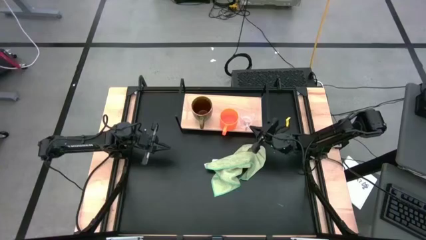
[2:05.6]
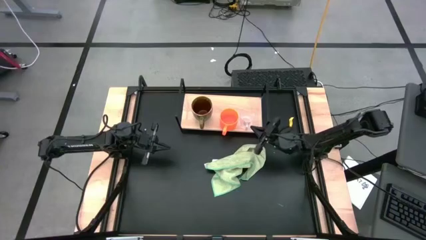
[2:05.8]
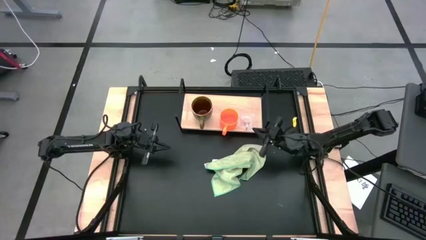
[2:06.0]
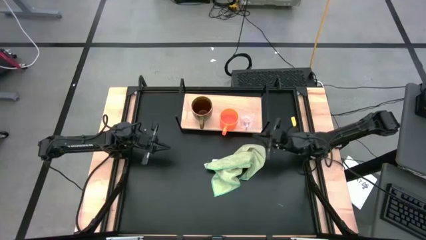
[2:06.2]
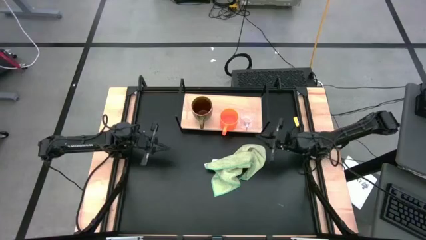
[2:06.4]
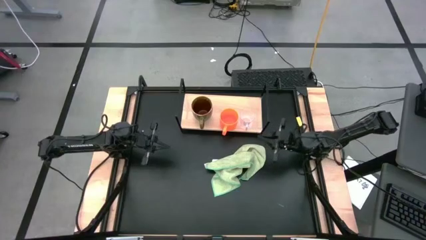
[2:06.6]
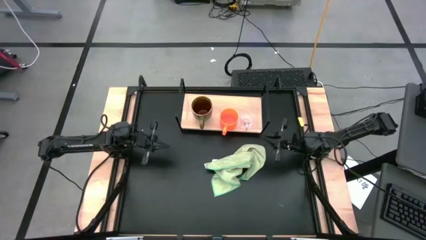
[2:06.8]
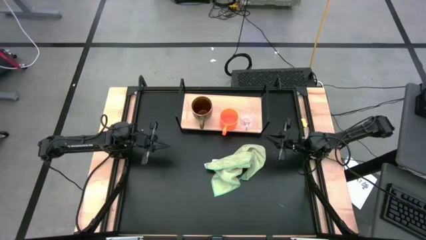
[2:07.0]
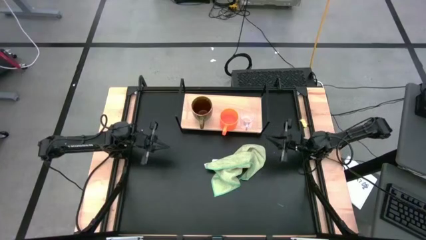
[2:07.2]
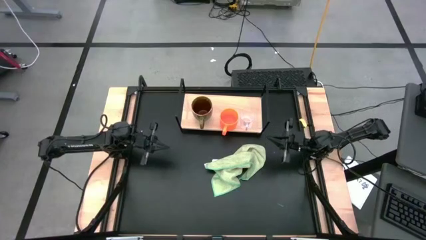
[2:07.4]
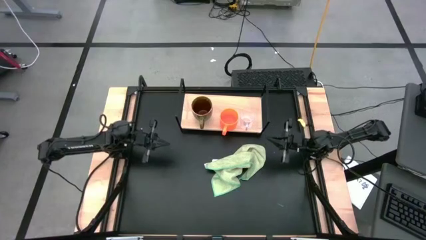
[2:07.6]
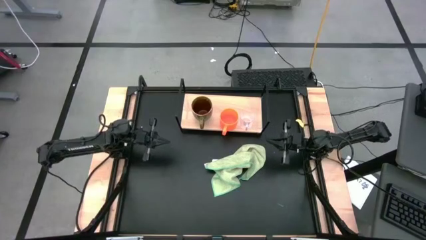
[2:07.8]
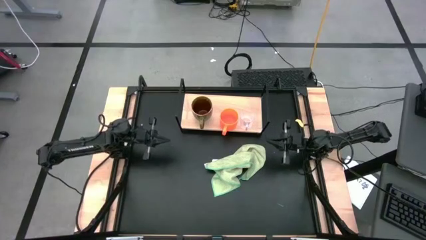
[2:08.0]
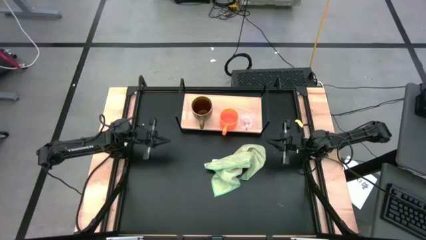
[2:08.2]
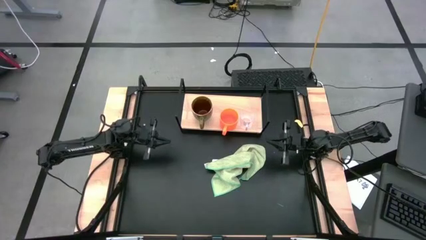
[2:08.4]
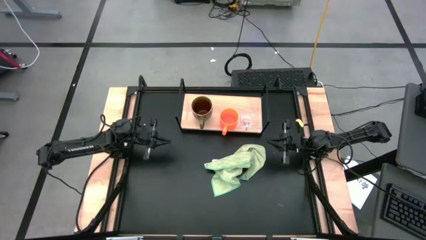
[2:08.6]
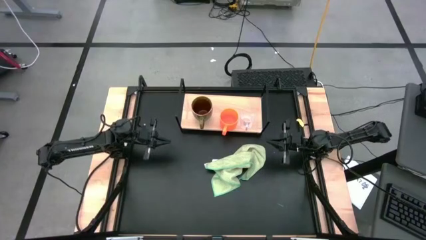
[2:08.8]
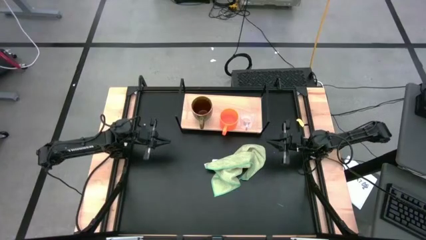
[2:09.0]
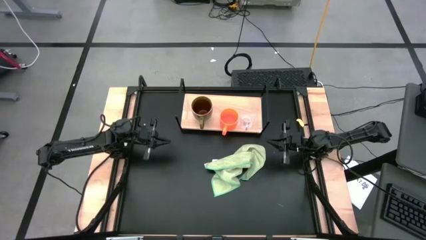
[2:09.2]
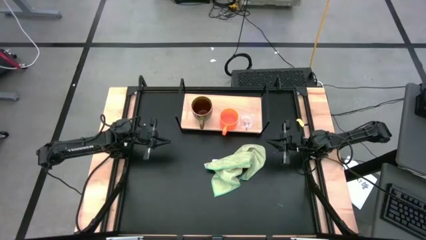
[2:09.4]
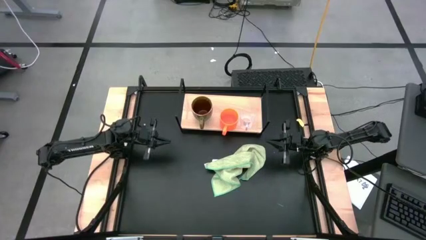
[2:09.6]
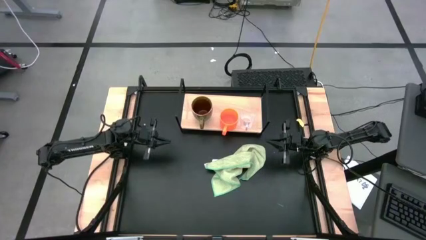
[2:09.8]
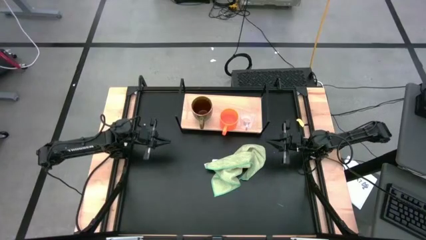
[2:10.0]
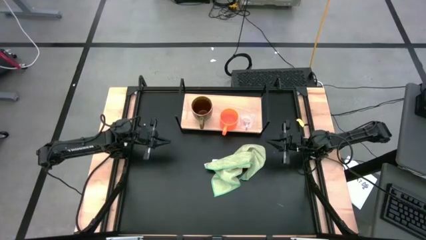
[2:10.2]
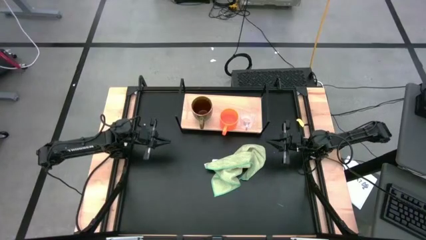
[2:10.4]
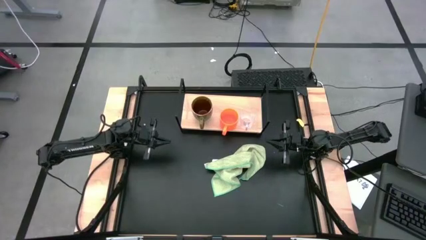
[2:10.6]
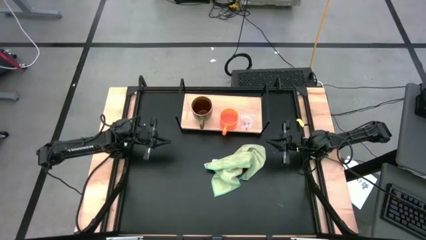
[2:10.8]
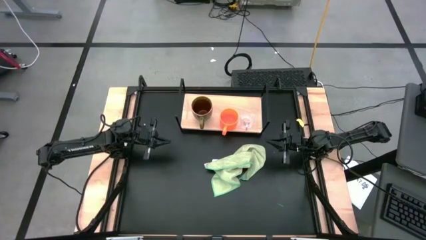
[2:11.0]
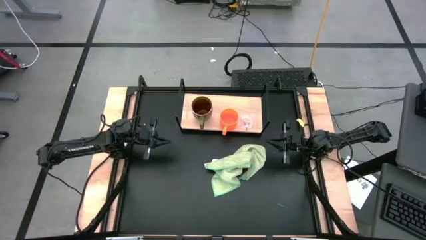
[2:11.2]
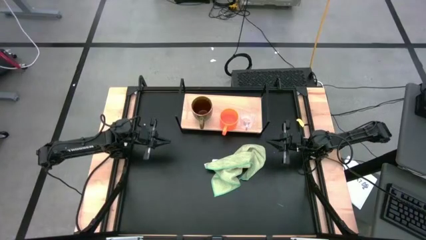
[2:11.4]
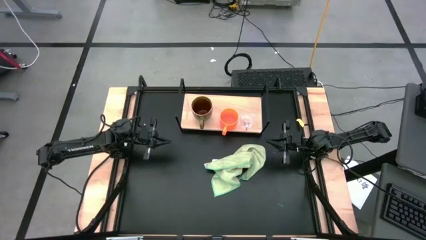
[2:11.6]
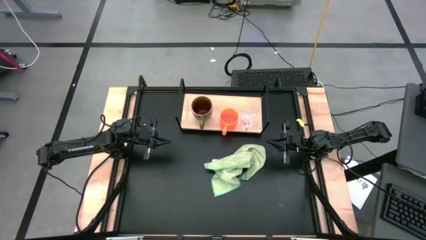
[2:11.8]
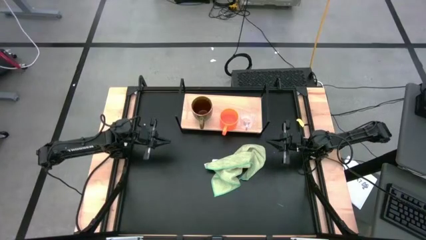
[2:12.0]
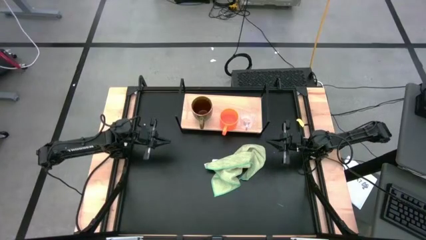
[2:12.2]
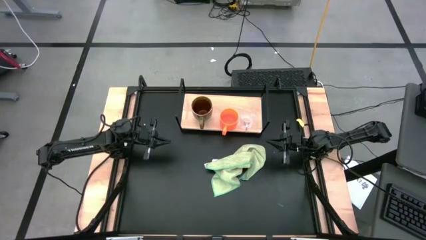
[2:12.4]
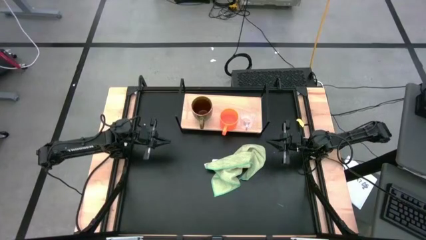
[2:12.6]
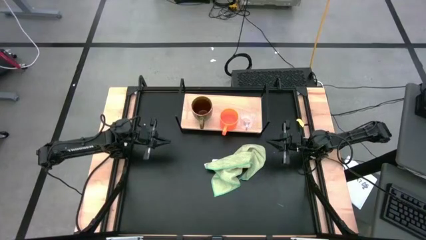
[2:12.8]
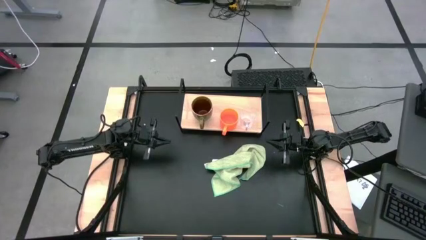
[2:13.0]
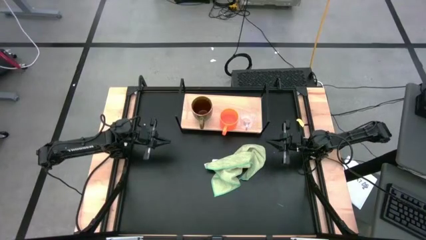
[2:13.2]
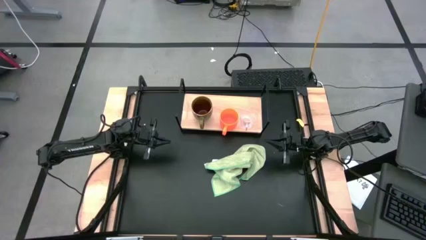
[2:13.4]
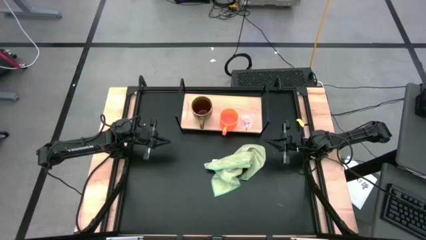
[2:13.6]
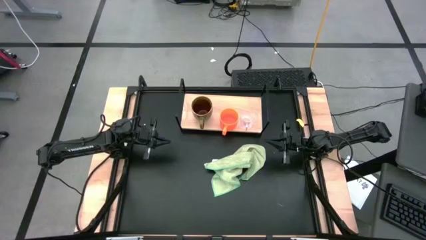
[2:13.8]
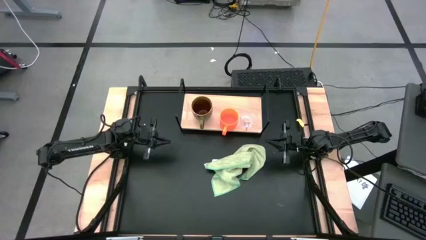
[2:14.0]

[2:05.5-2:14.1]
Task: Stack small to large cups/mugs on shelf
Return to Home Position

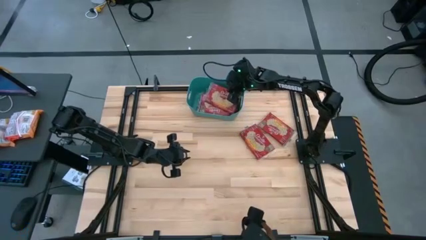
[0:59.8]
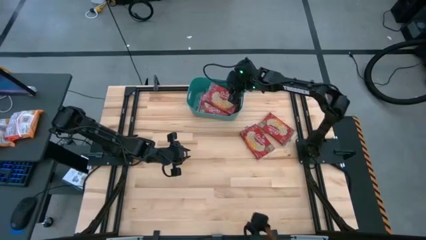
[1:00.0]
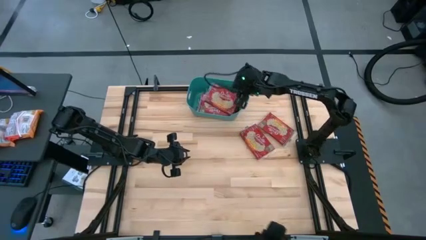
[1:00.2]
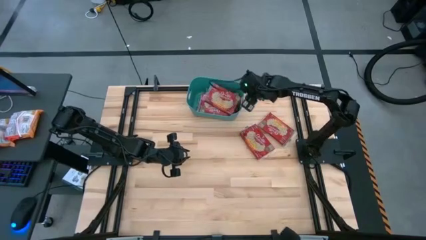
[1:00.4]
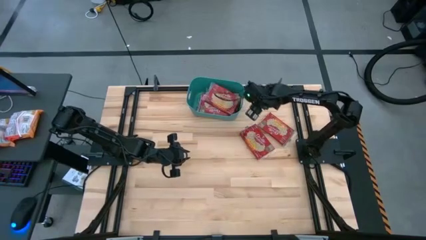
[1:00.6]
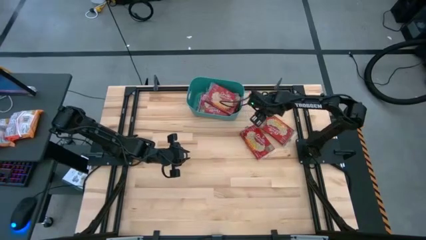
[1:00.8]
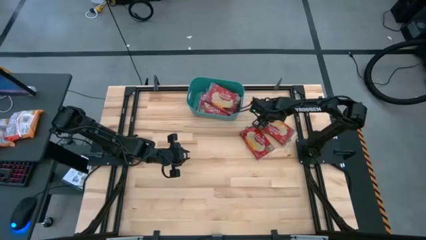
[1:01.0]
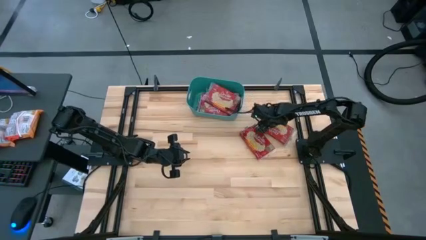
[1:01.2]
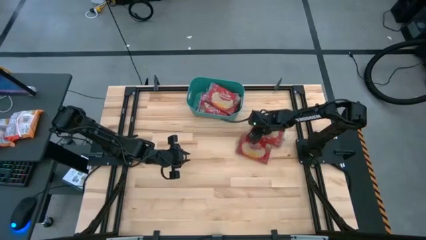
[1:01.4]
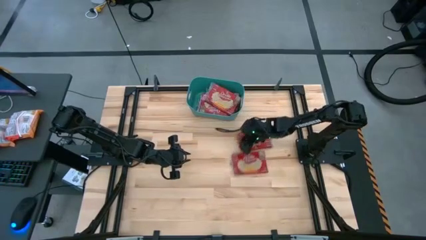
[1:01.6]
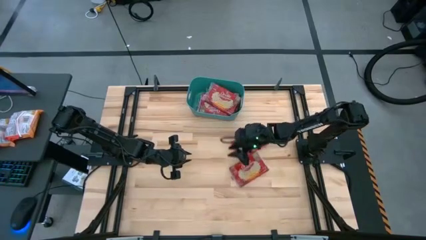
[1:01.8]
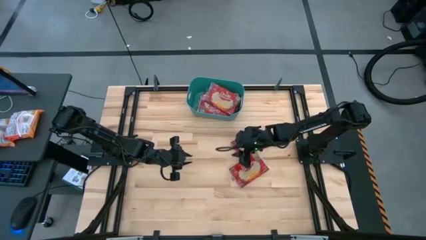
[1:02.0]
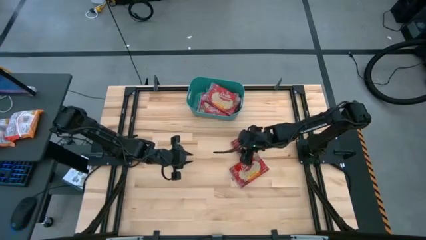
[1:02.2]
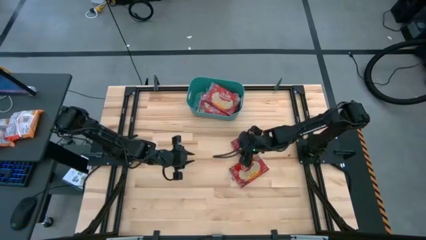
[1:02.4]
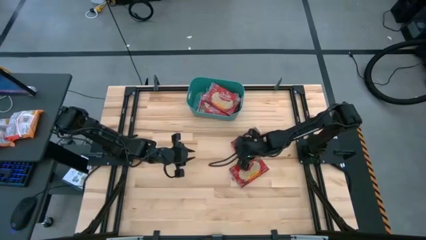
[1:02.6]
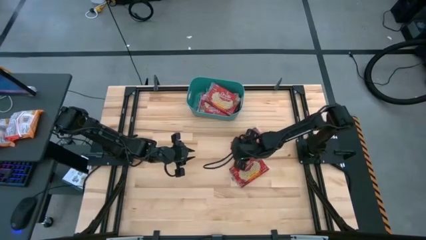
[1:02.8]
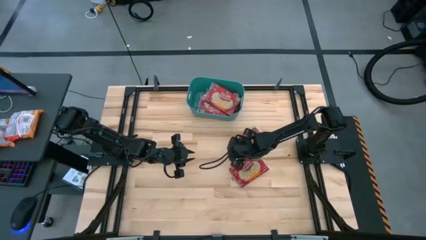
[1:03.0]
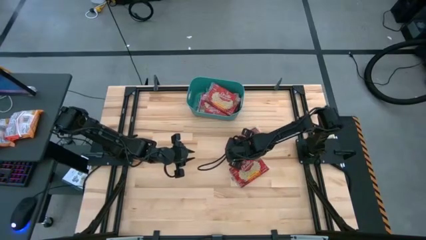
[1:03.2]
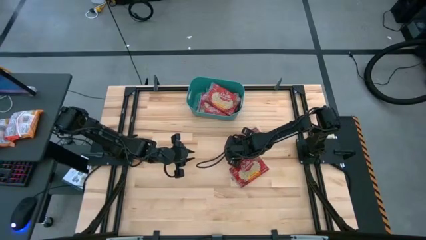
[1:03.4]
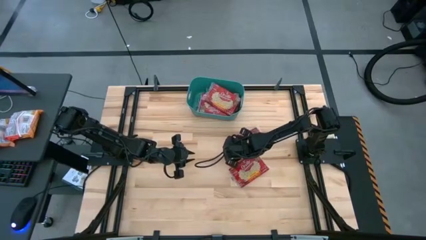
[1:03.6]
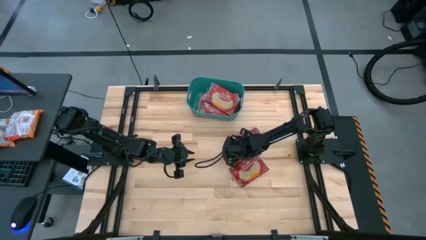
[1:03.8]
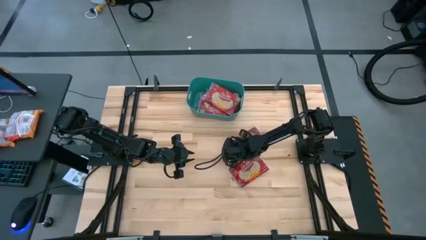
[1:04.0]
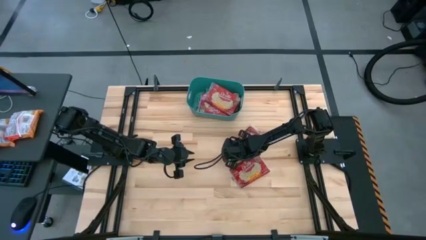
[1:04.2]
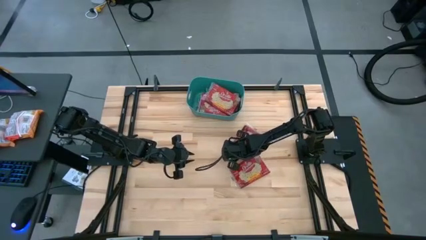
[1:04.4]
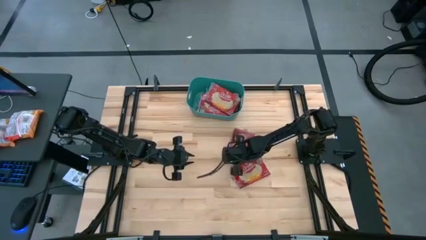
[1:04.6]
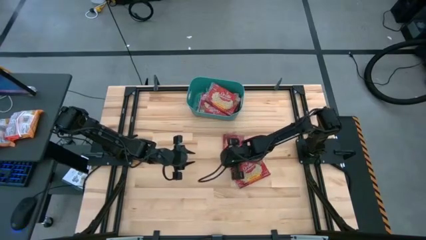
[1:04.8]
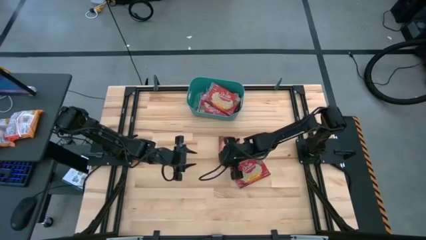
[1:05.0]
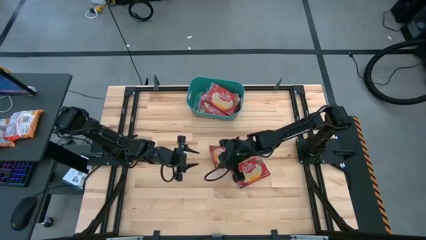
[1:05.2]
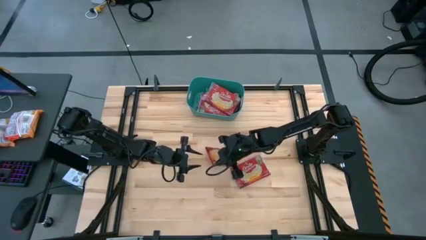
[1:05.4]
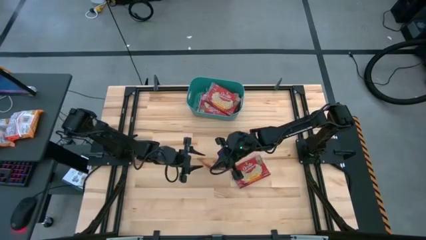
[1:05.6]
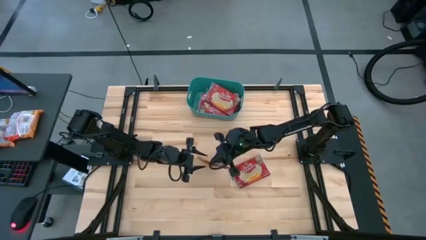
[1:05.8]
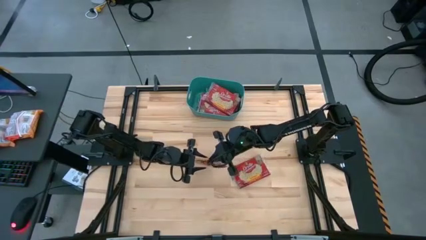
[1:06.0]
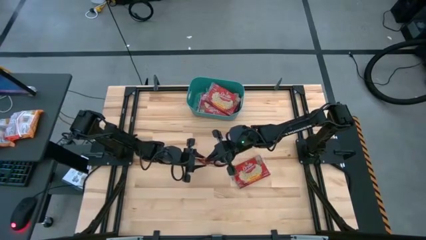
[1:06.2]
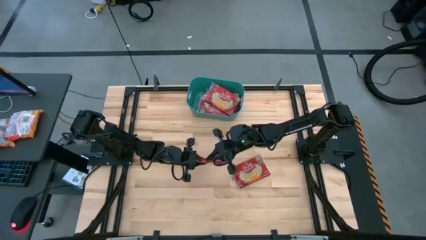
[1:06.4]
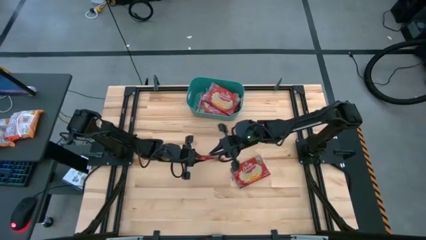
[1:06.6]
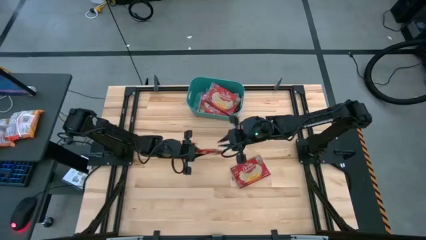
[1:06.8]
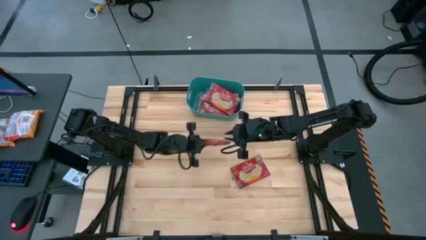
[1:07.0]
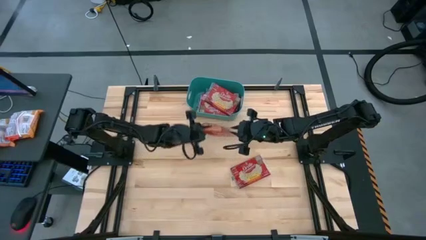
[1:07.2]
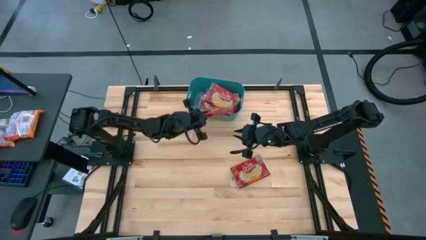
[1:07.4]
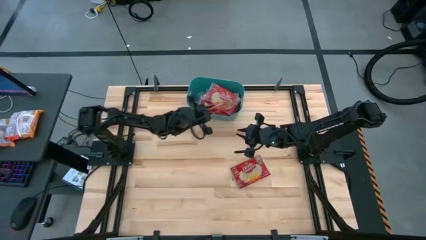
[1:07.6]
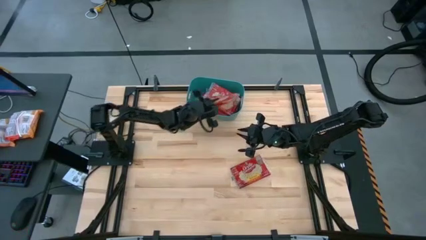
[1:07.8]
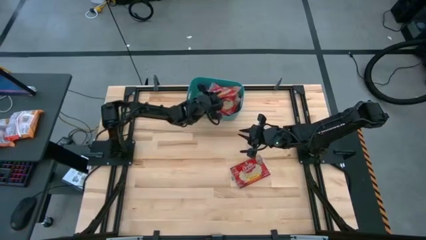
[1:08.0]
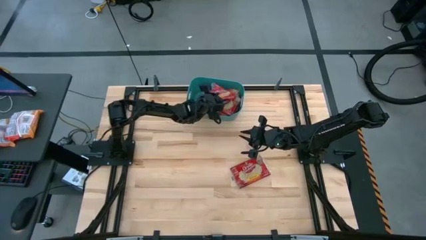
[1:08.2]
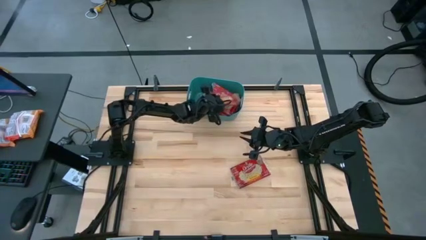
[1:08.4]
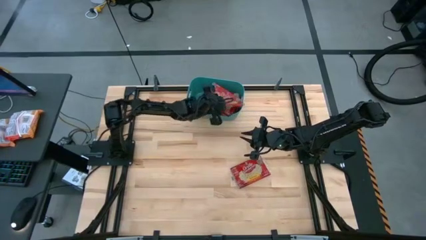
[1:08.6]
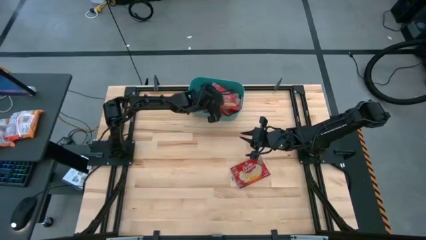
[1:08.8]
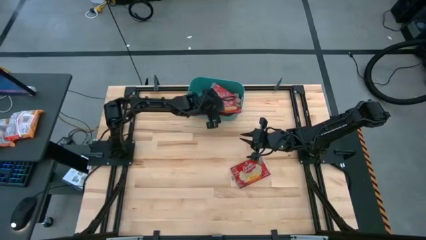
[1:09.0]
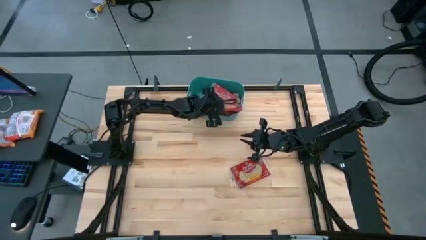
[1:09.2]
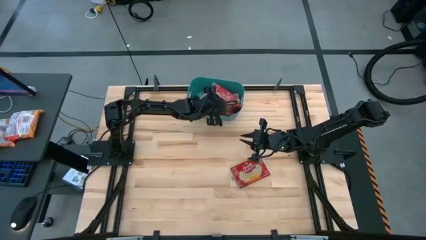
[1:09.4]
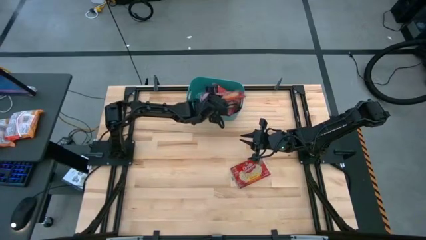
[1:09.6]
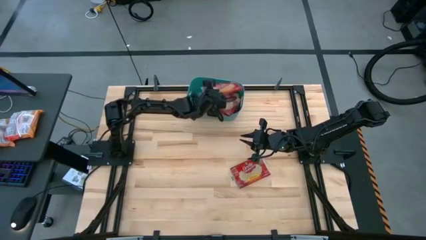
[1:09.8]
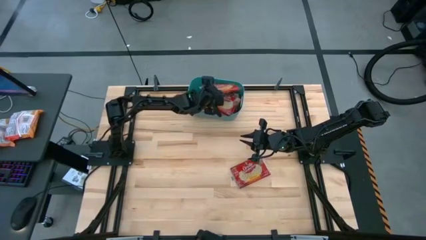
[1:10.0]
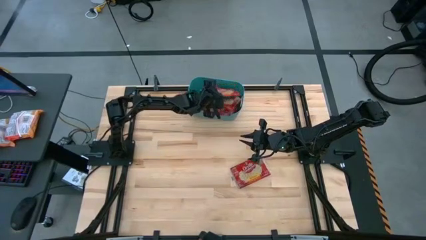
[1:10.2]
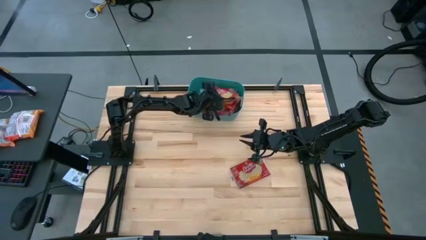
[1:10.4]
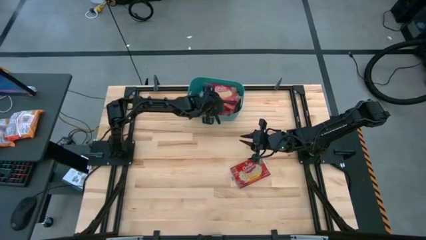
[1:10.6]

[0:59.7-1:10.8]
Task: Sort popcorn bags into baskets
Put the red popcorn bag into the green bin
